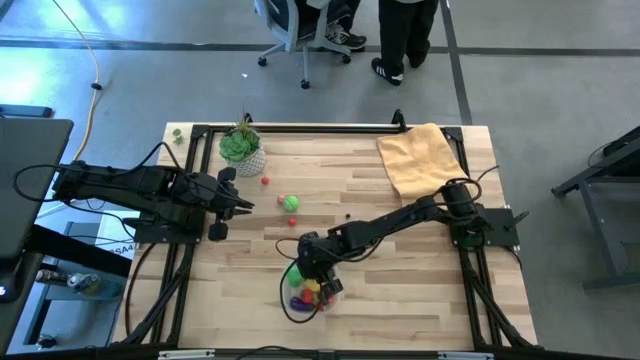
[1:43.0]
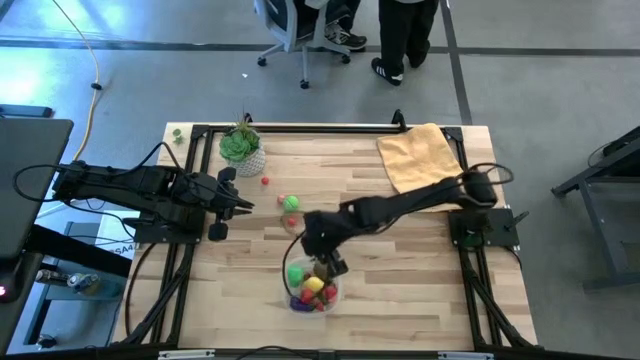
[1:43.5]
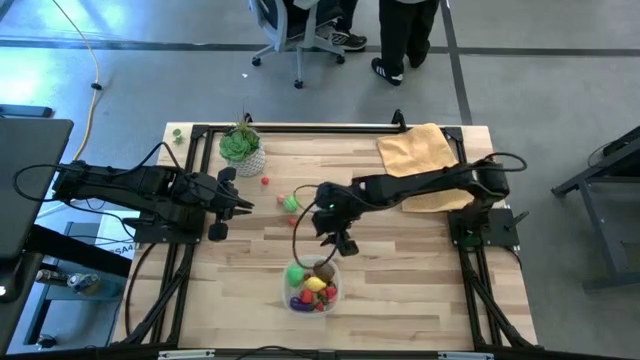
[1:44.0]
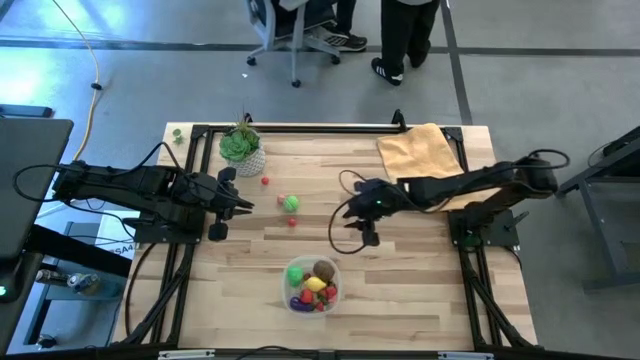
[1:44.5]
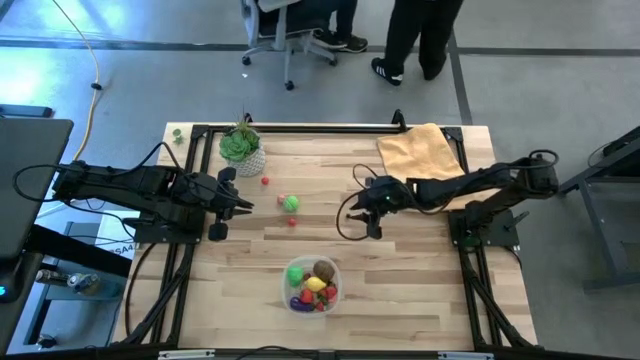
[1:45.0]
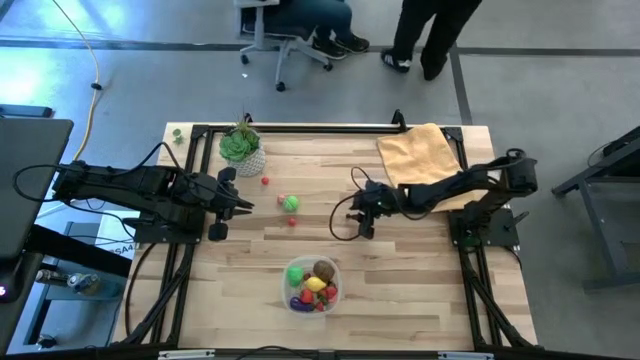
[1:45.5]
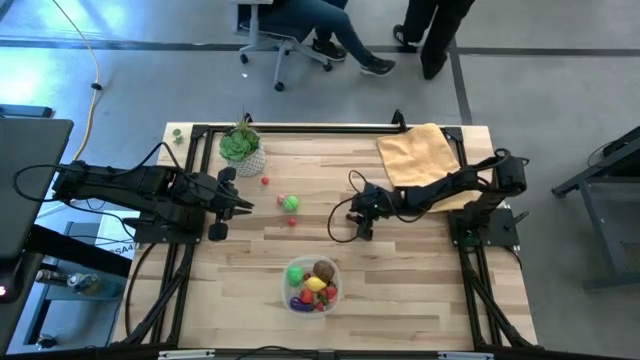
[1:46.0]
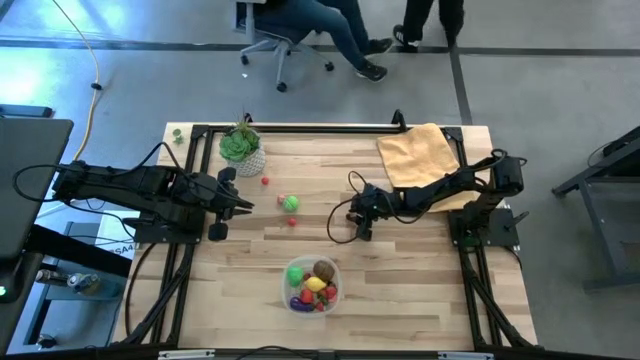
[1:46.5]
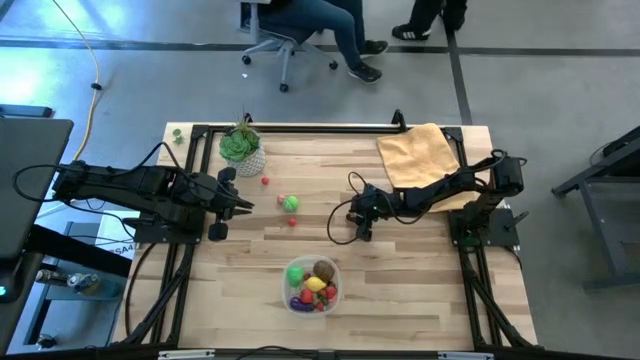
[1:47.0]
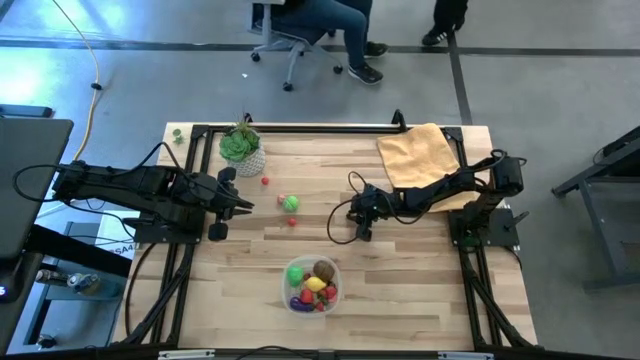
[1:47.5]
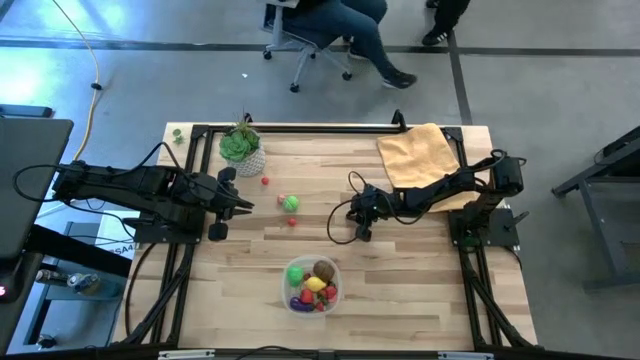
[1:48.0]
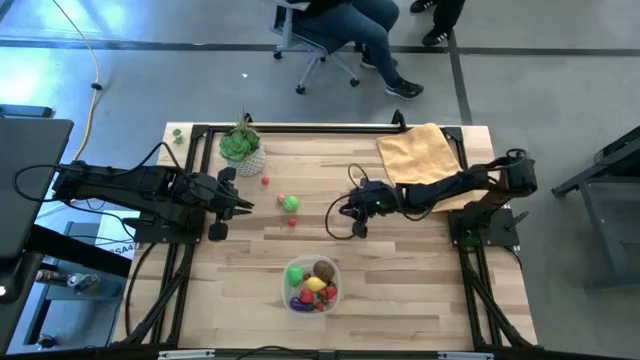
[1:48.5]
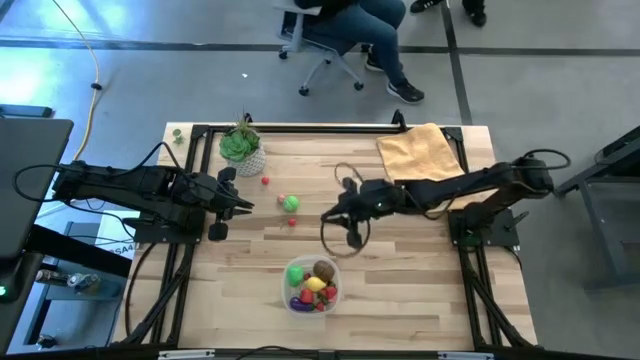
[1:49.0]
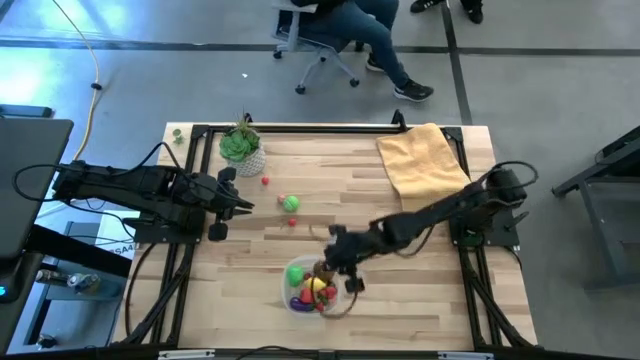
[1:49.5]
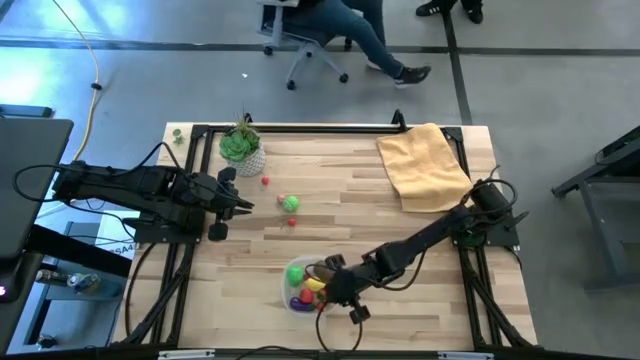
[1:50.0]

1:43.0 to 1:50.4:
Task: Pick and placing Produce into tupperware
Put the blueberry into the transparent bin

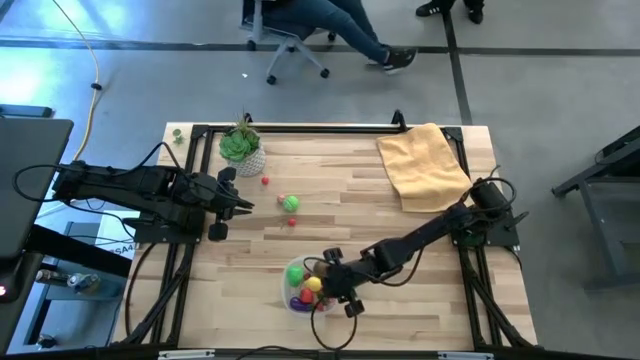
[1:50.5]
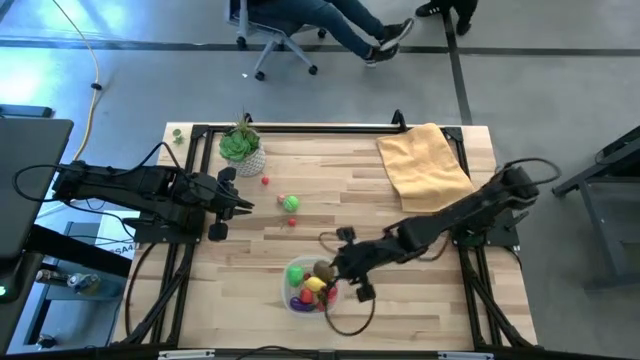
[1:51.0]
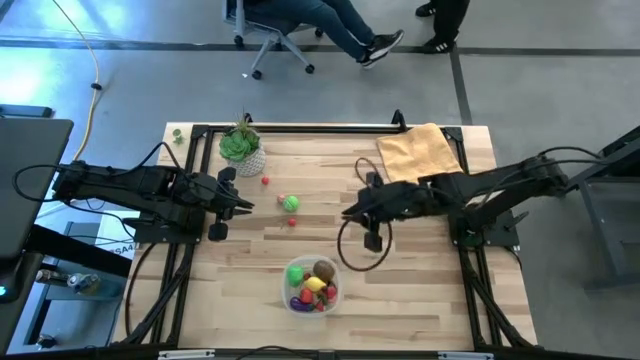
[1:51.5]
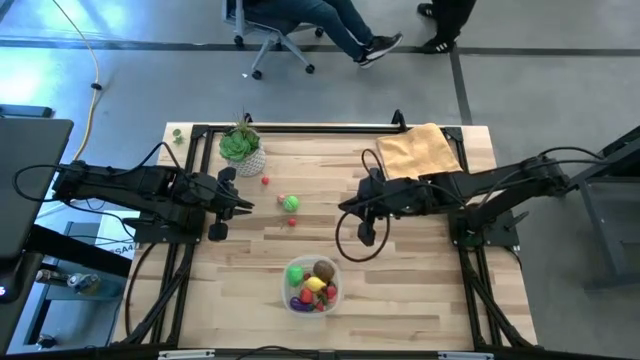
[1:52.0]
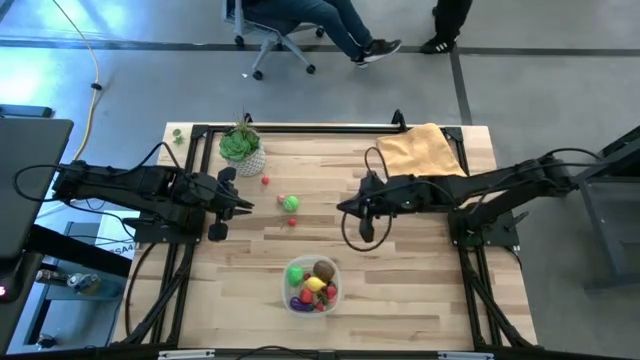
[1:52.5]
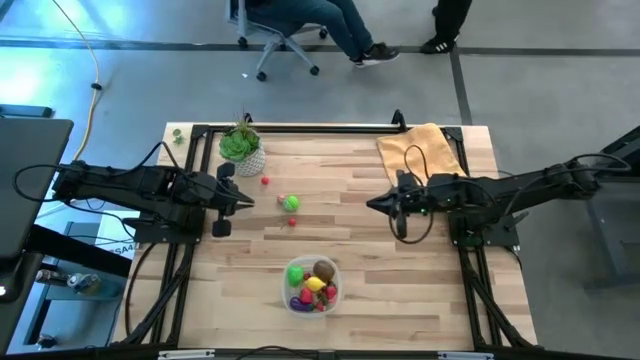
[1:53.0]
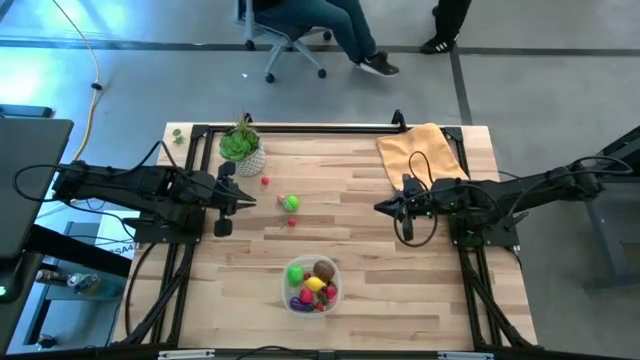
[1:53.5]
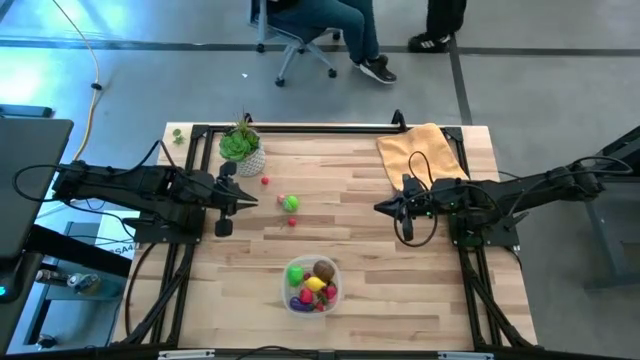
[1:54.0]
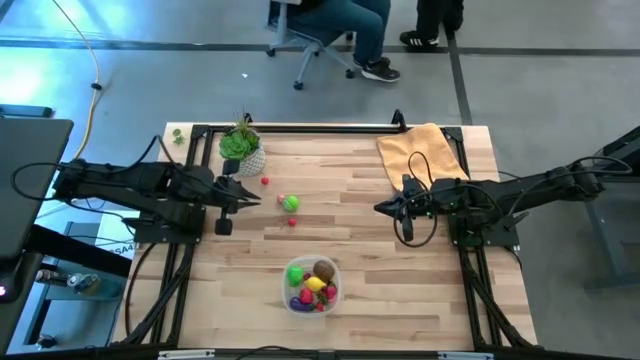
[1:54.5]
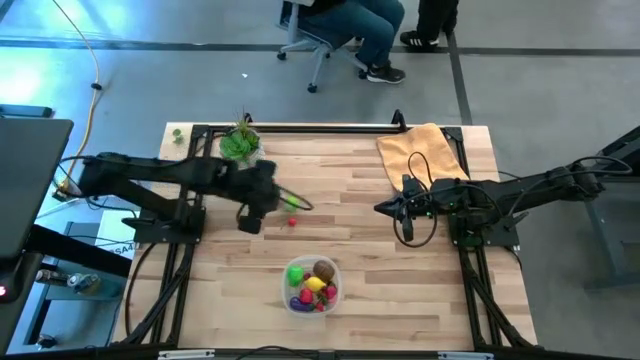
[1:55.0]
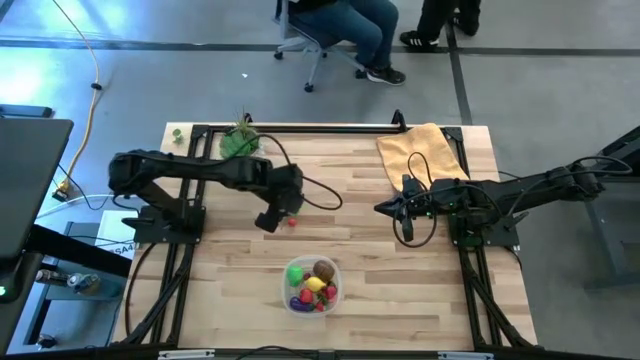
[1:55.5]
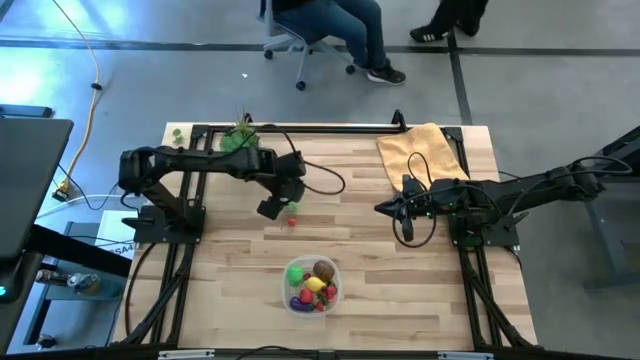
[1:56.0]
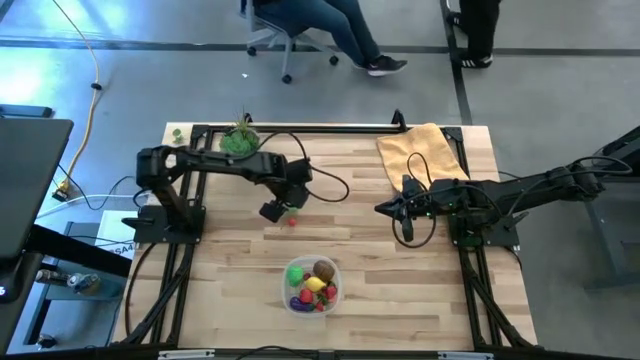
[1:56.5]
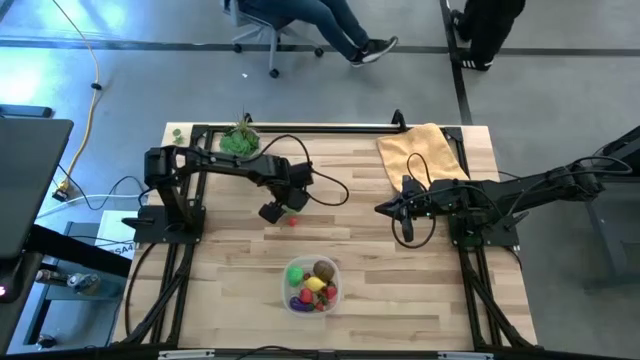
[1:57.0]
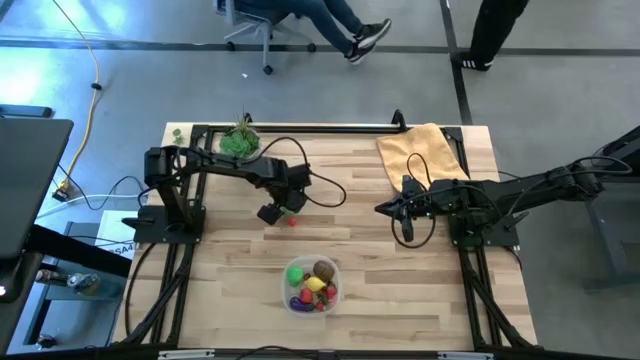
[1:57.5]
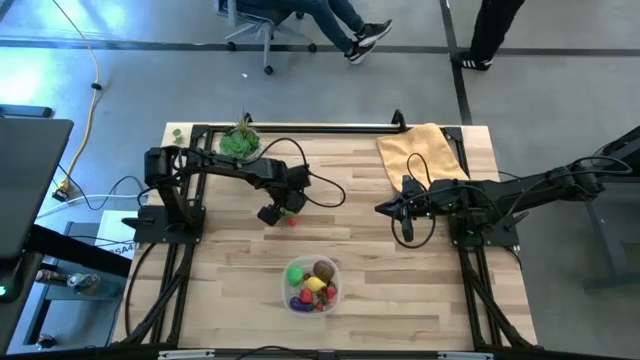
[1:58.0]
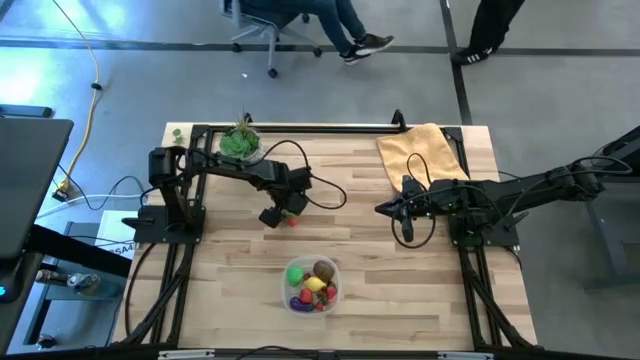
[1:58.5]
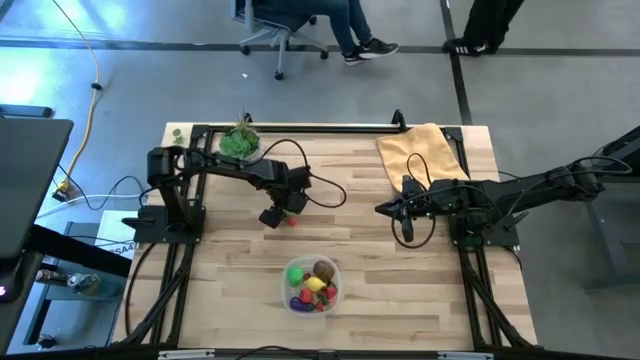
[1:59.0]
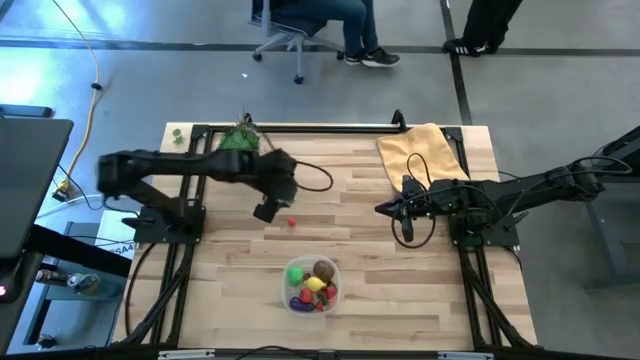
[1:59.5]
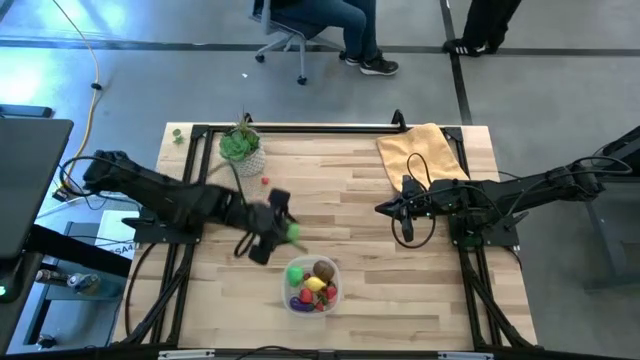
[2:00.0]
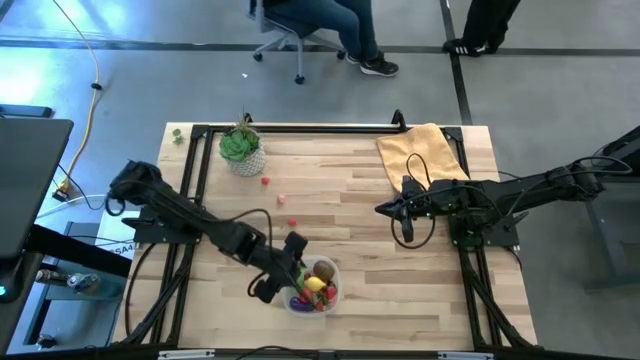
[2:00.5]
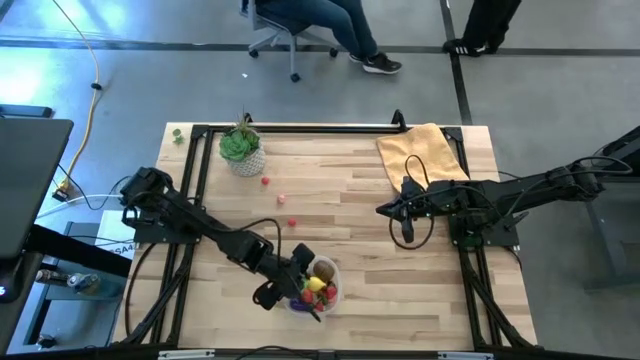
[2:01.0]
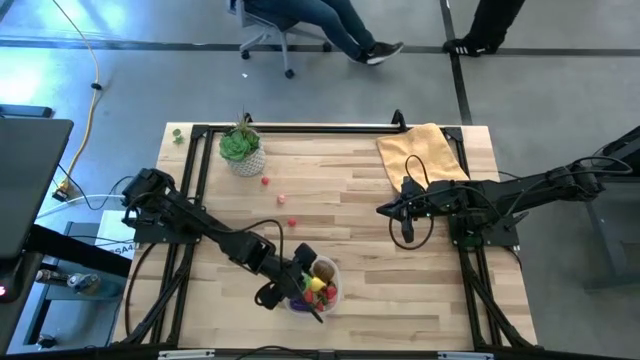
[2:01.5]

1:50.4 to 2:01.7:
Put the green cabbage into the transparent bin

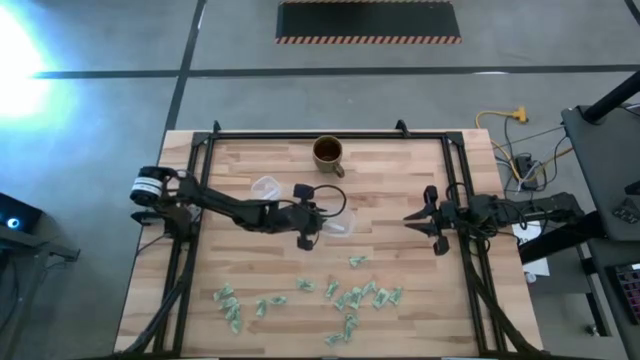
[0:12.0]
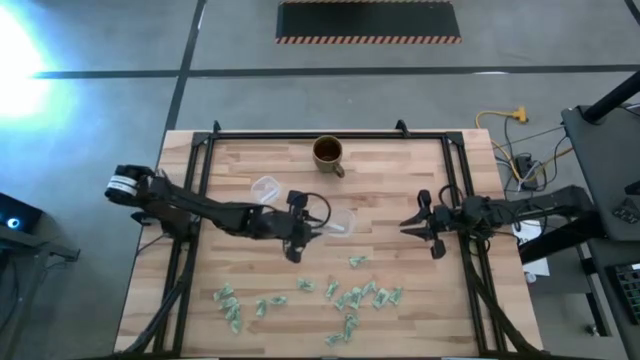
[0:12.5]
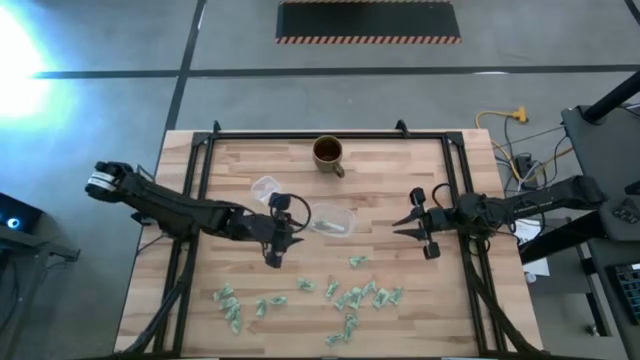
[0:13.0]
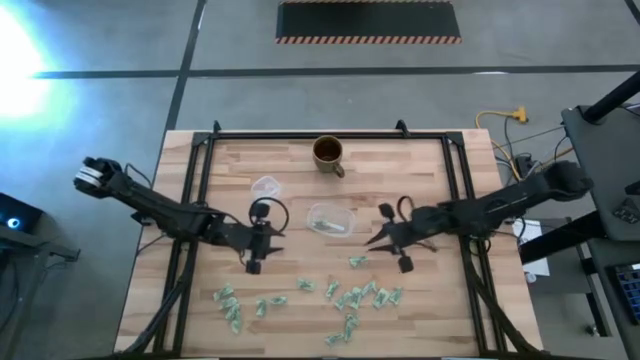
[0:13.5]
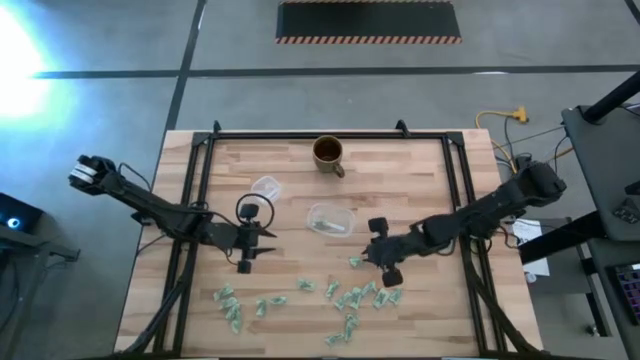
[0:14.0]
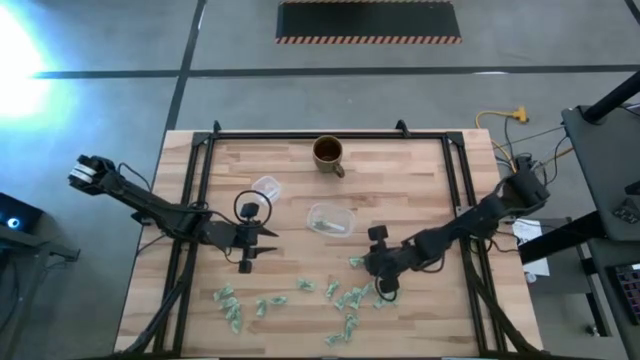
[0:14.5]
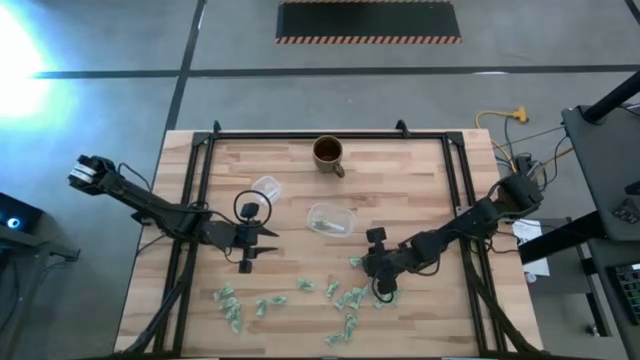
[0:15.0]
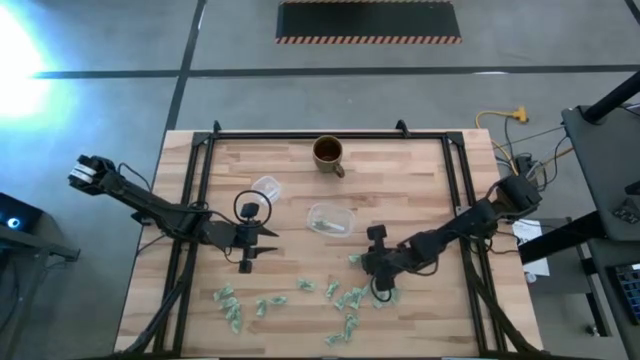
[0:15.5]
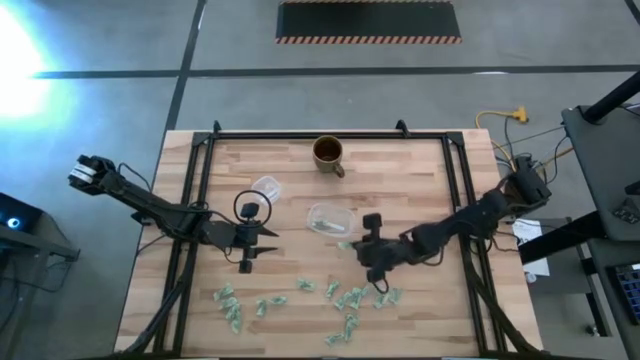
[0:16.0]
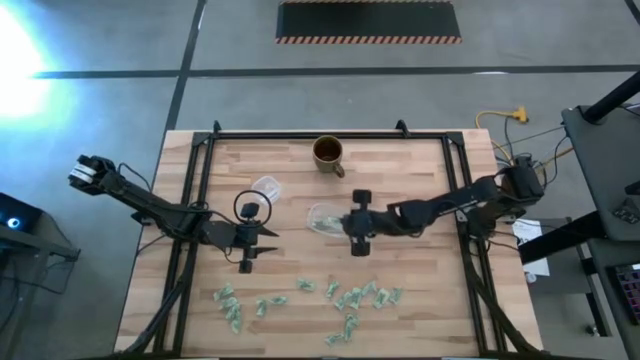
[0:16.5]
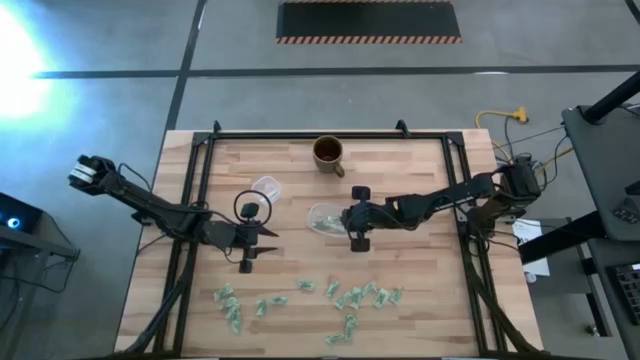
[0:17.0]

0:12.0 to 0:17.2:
Task: Pick and place Stevia / Truvia into bins
Put the green stevia packet into the transparent container
